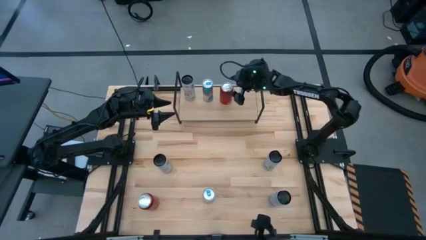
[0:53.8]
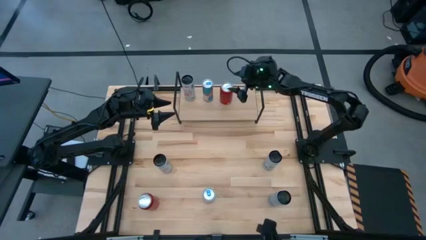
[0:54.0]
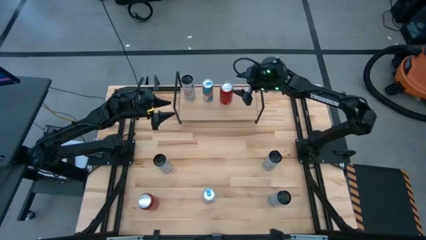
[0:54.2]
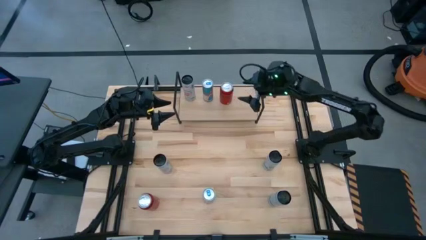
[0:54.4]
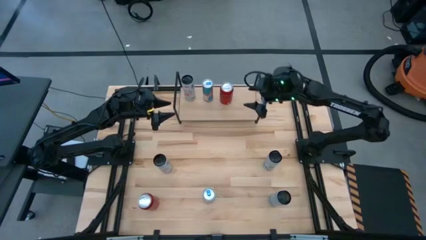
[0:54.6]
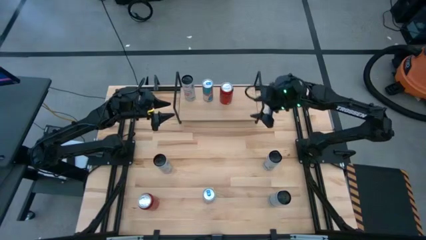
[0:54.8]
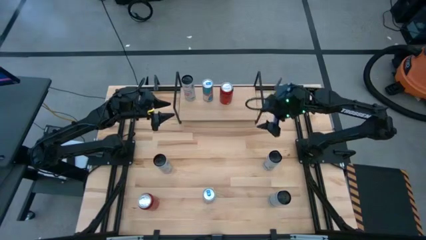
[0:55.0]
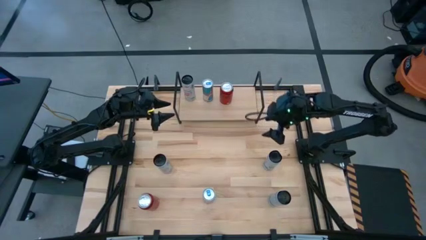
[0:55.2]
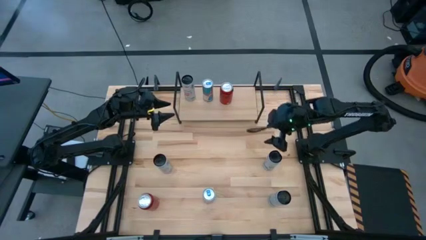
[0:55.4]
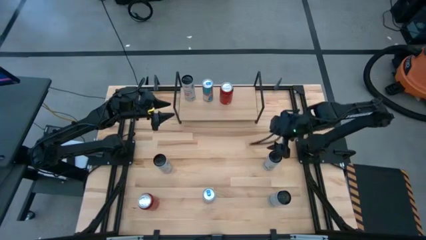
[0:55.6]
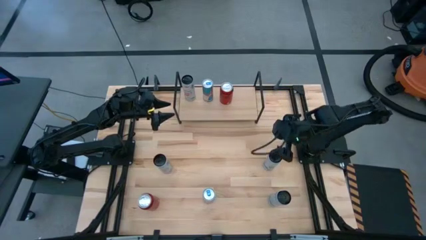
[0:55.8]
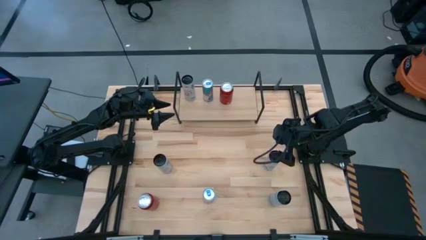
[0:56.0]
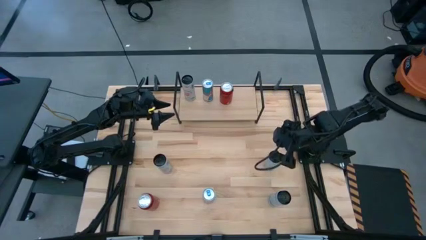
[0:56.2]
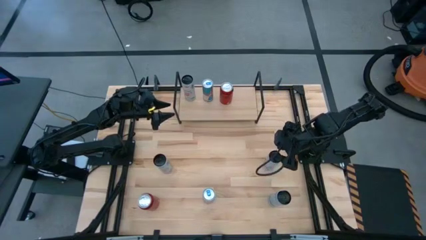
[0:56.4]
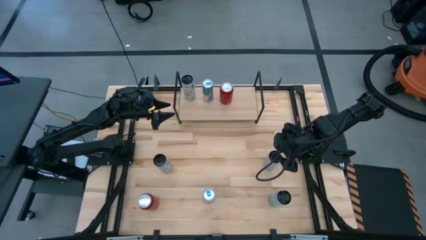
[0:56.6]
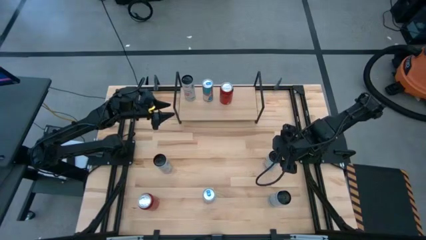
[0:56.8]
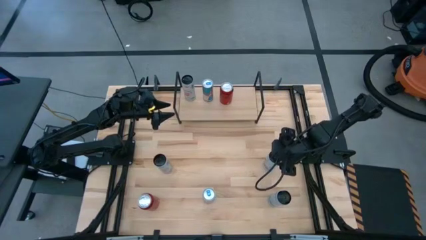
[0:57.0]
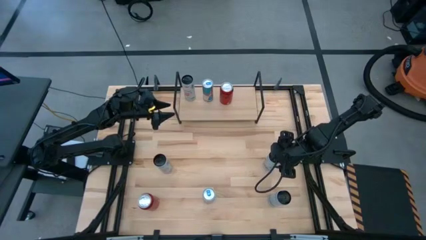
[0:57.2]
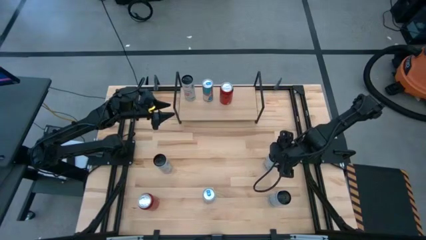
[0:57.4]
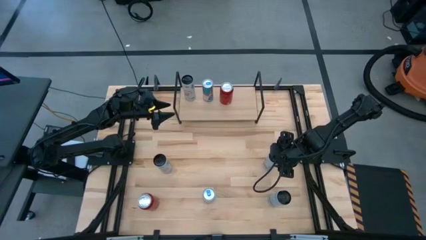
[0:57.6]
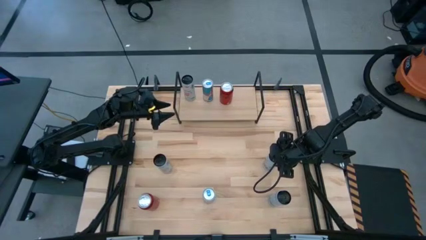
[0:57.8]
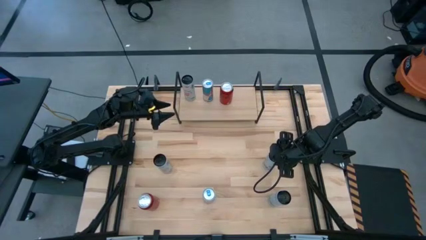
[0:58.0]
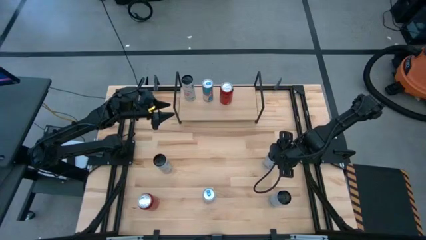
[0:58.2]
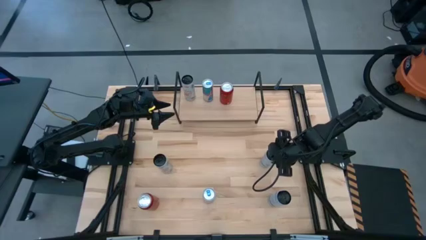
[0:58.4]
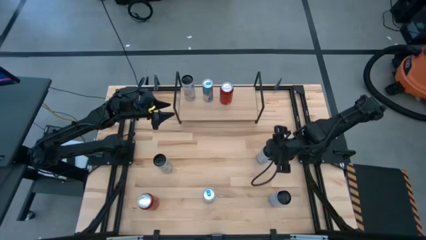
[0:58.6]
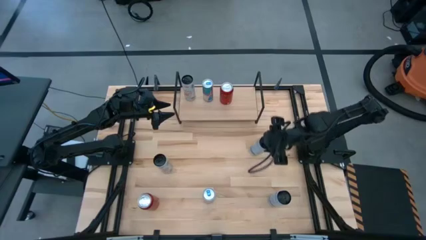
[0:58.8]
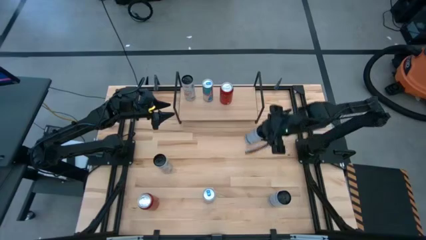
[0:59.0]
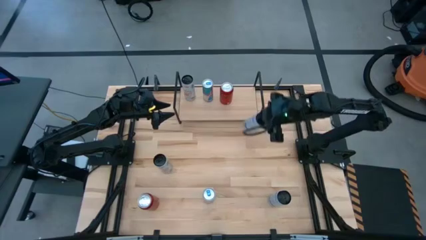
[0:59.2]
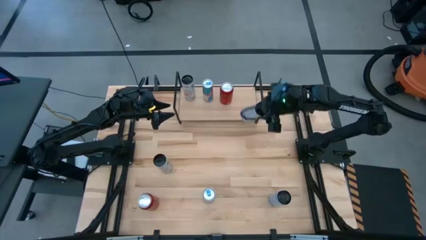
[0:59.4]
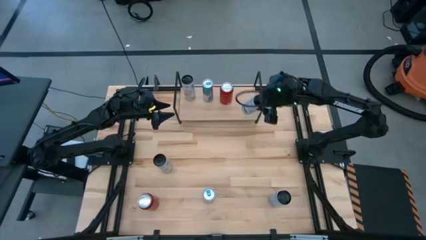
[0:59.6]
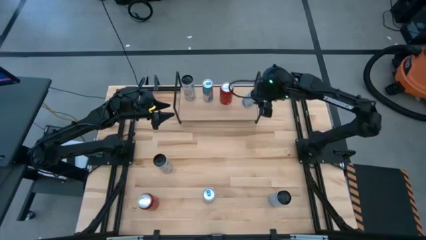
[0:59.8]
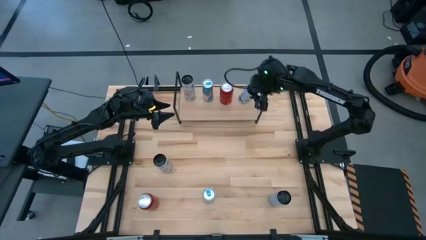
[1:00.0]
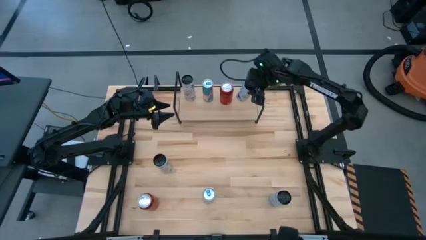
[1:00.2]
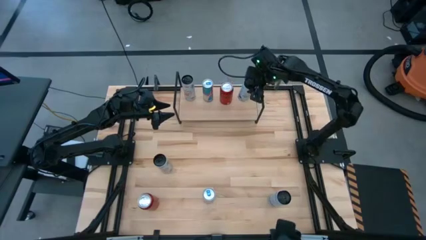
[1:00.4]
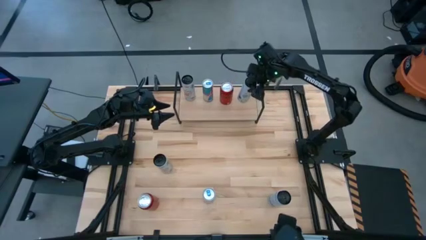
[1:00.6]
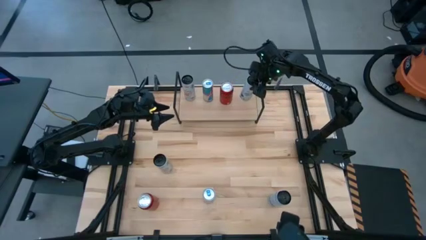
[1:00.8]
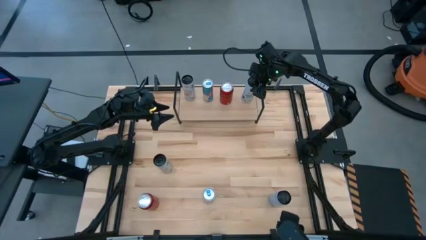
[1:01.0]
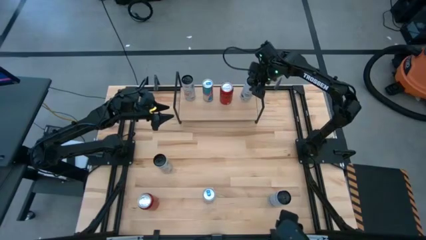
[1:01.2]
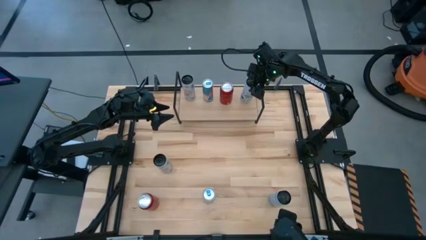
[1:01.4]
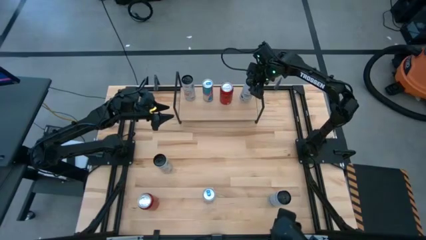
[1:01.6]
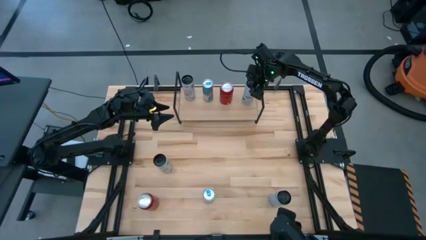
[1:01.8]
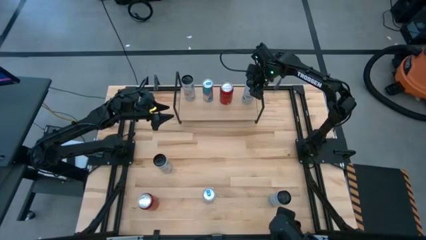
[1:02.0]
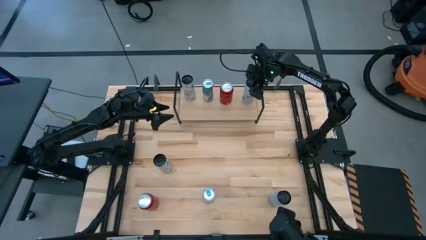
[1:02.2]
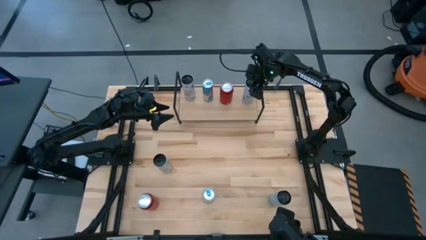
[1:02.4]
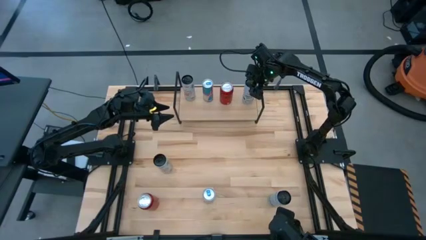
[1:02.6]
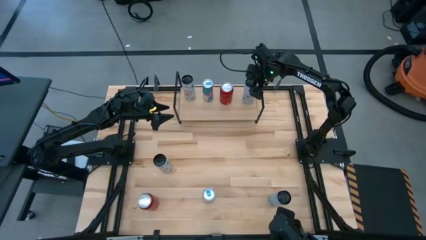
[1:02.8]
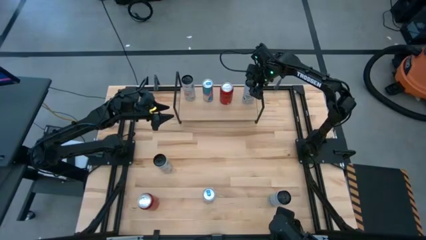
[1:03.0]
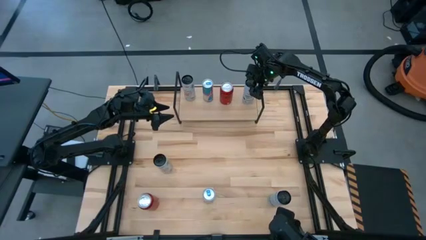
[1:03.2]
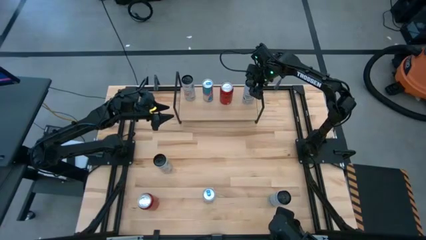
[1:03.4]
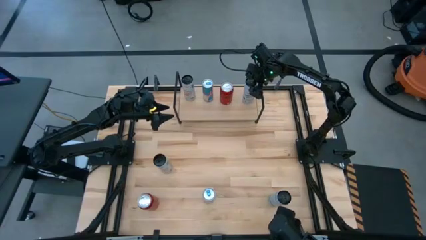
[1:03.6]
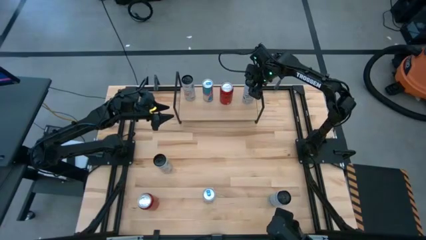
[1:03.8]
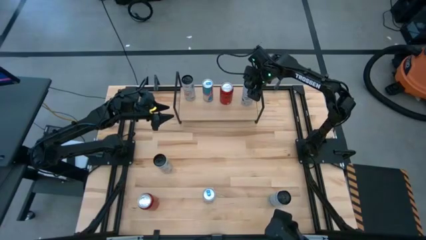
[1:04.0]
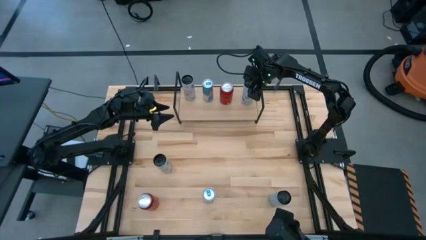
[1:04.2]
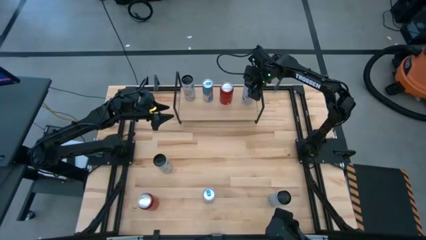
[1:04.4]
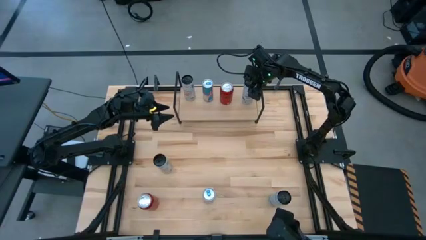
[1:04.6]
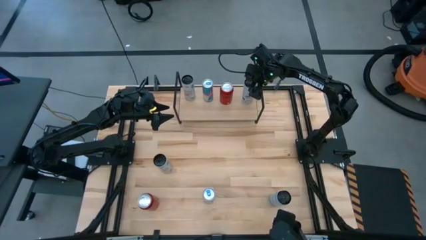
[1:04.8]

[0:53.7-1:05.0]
Task: Place canned beverage on shelf
Put the top right white-blue soda can on the shelf
